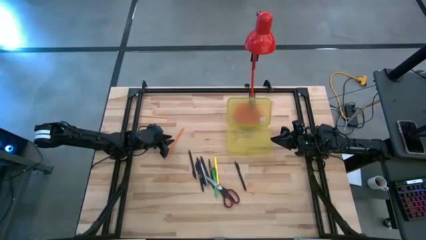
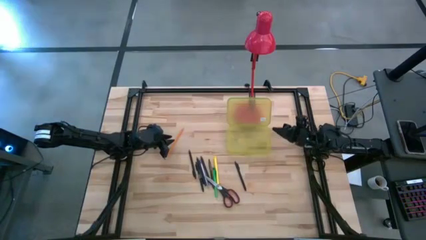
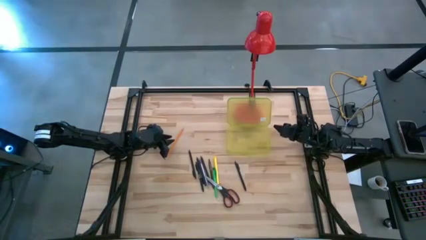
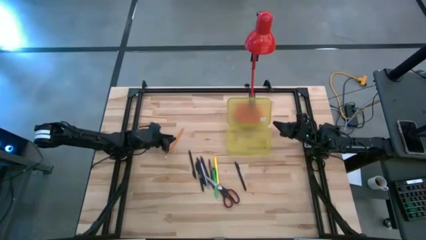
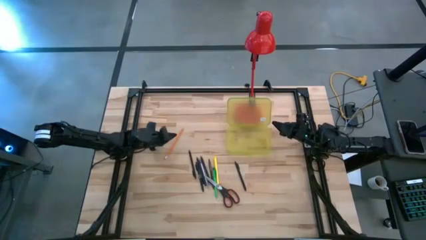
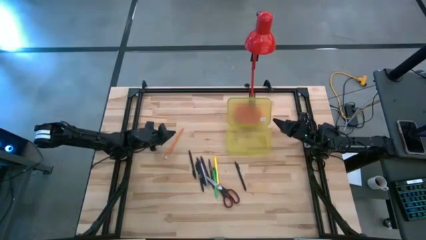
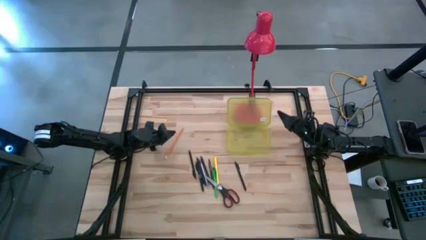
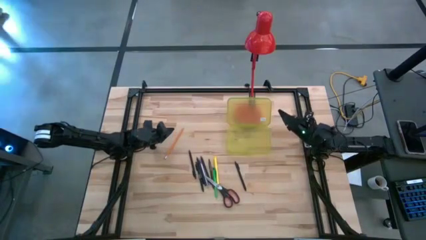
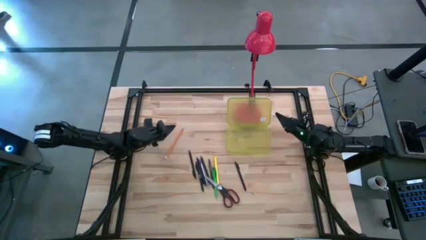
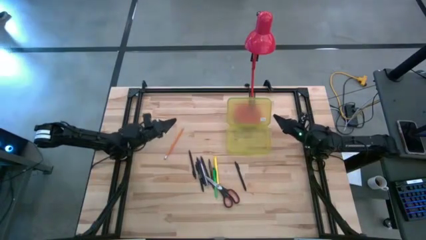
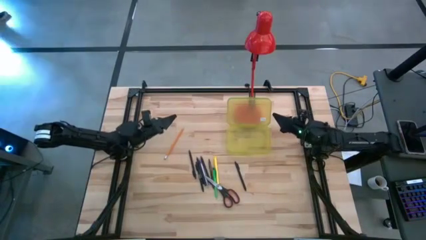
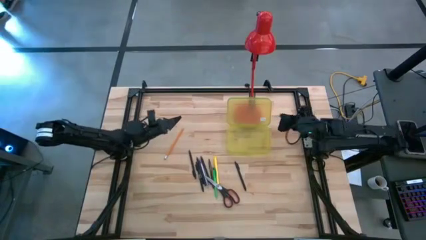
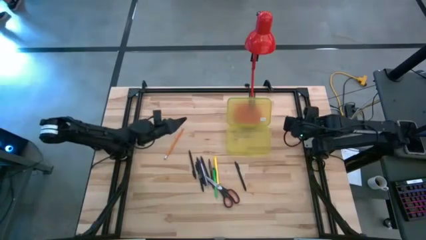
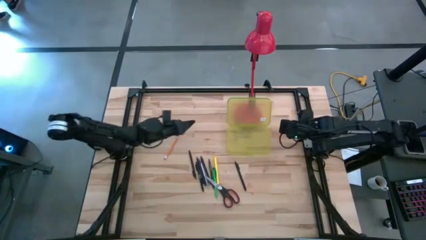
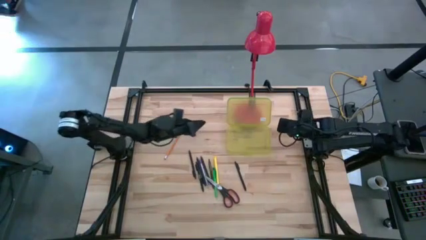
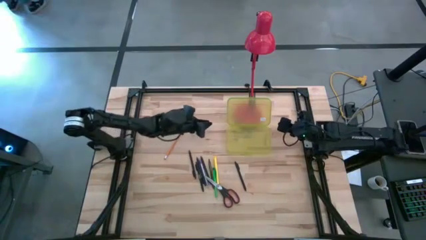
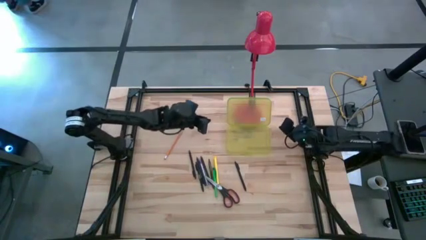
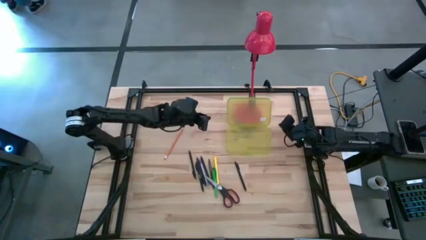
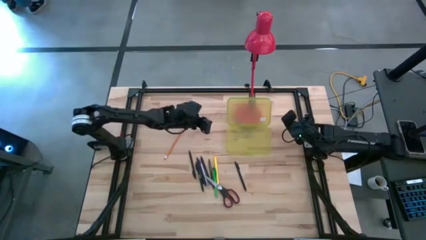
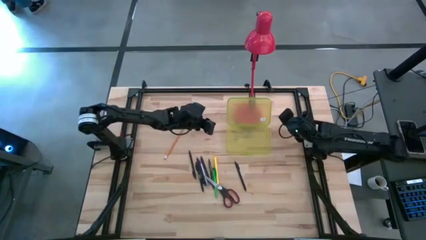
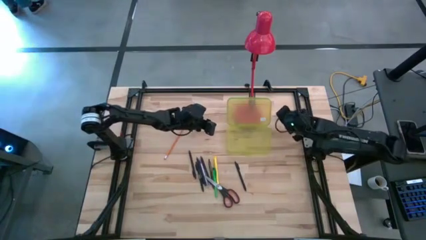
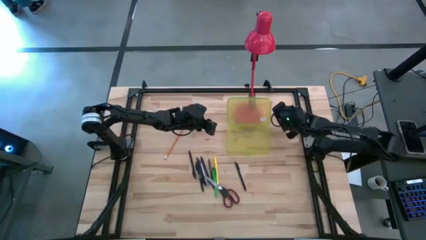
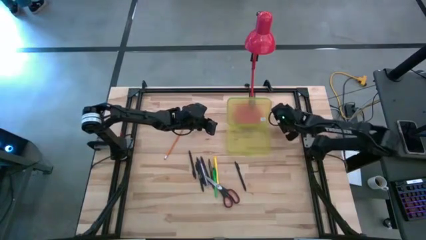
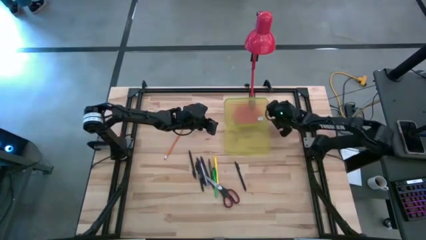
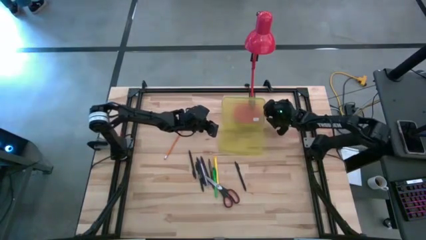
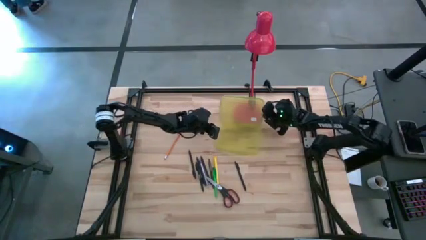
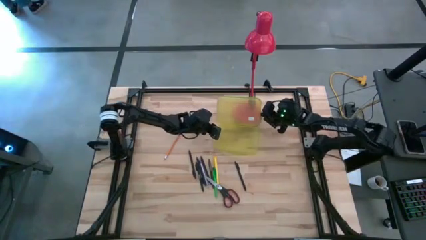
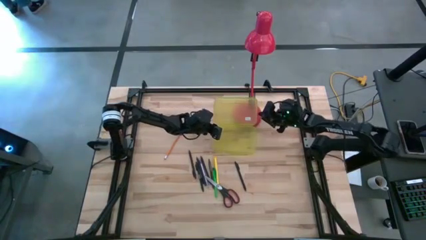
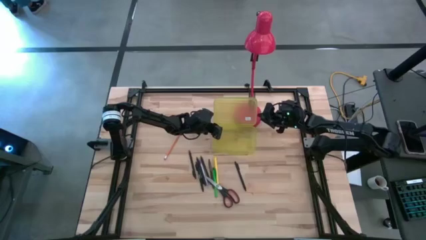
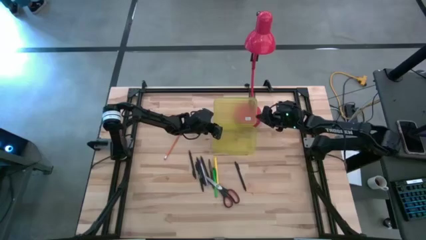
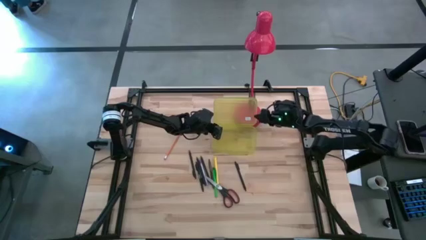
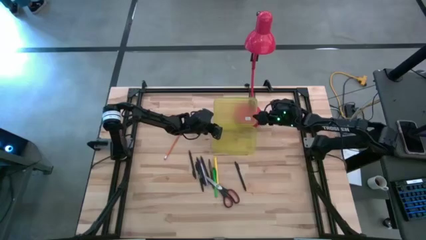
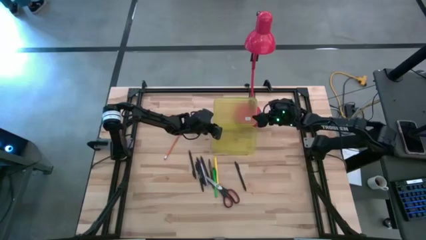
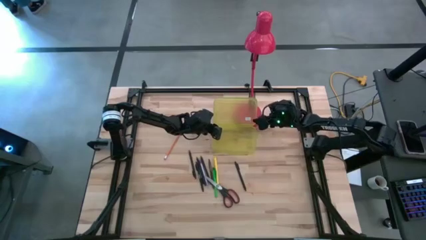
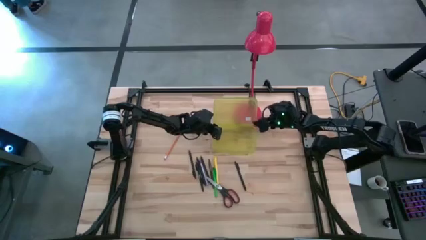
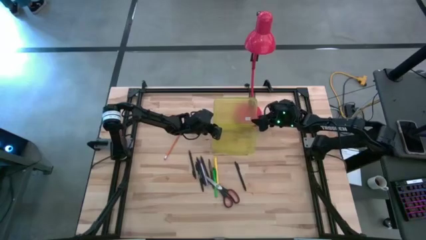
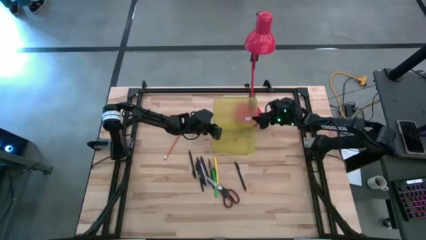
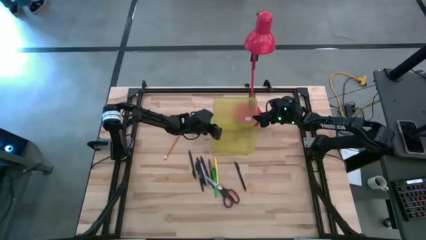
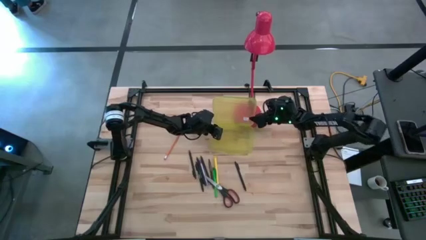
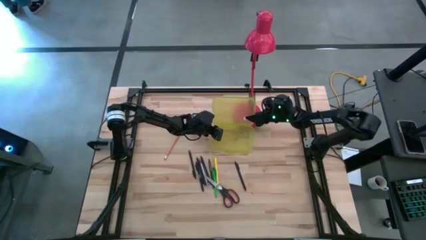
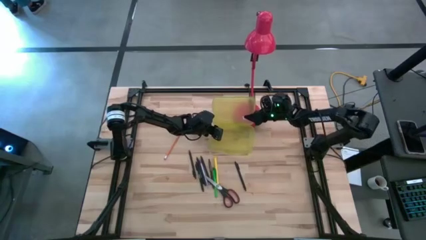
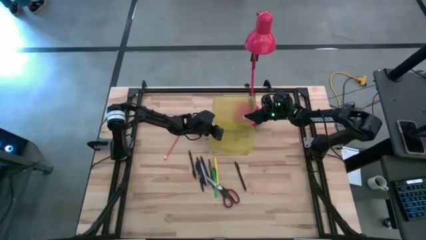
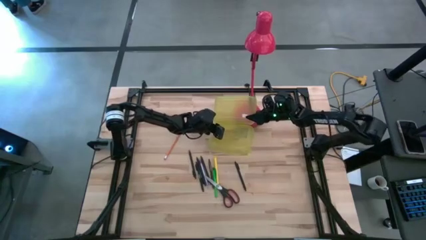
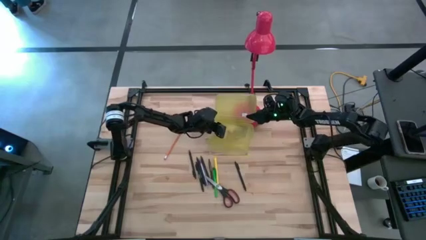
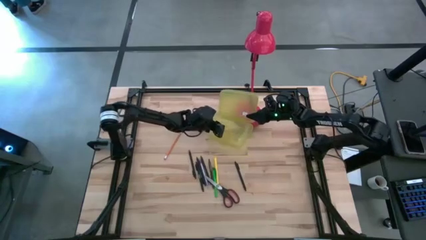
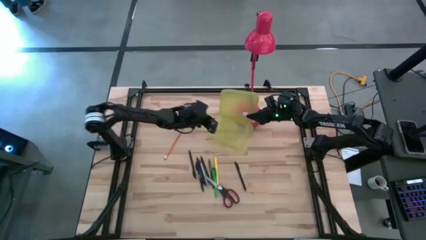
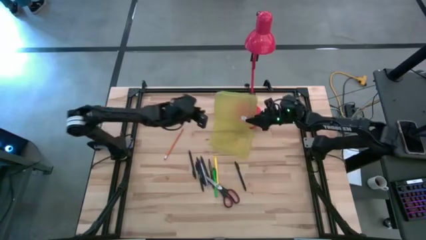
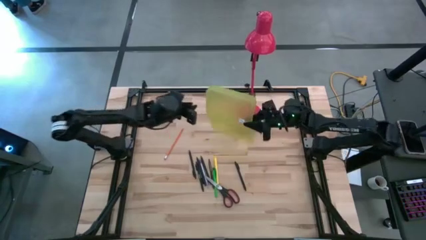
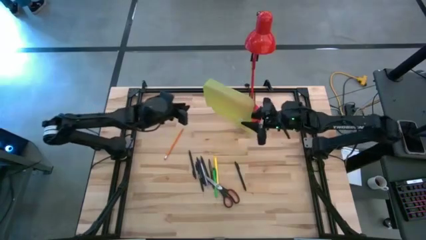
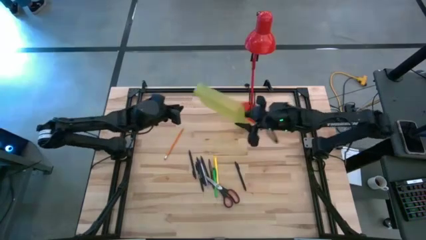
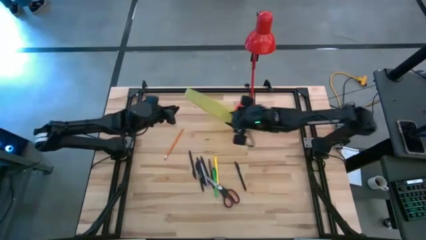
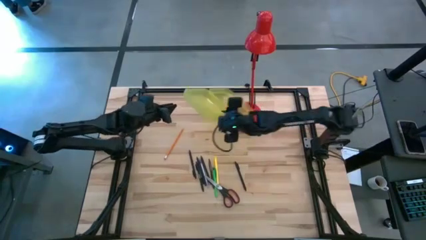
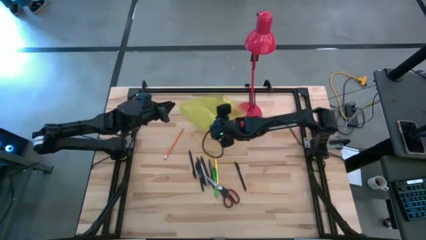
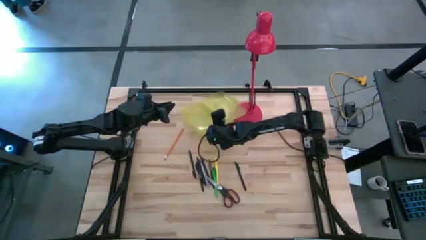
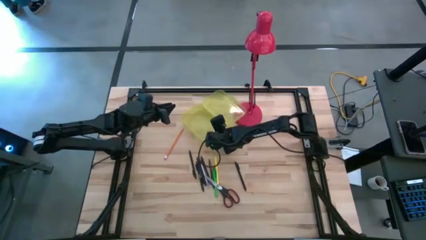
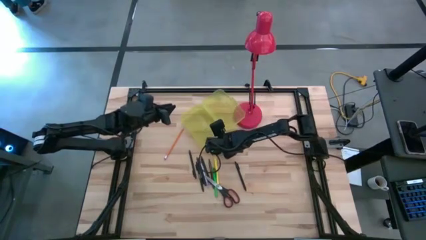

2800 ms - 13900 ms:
Task: Pick & place school supplies into a supply box
Adjust the yellow supply box

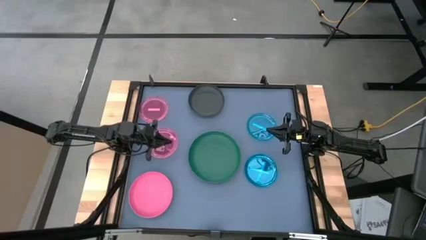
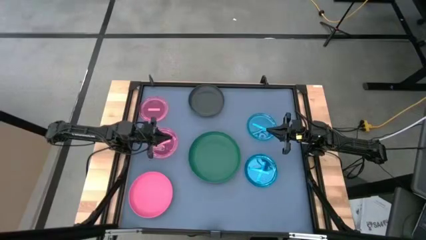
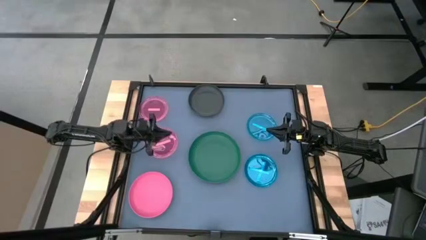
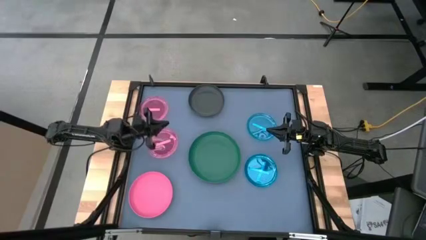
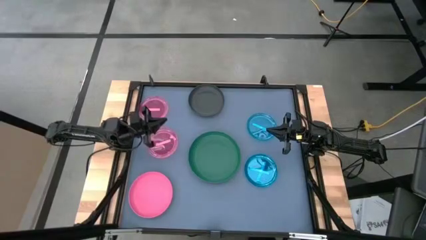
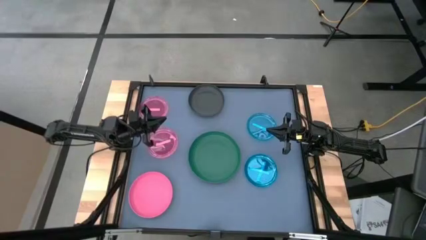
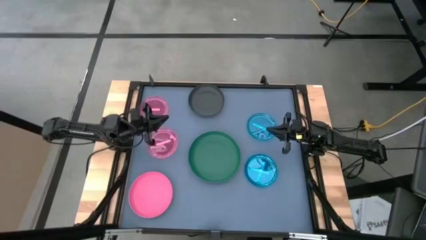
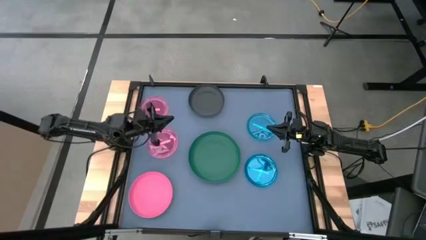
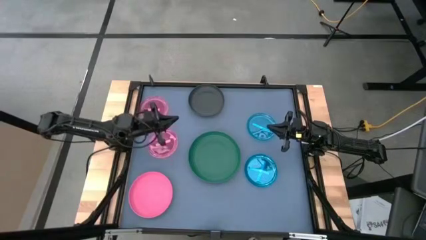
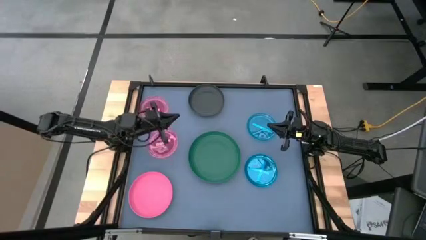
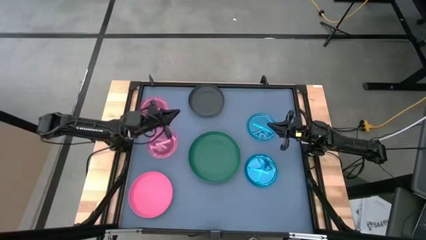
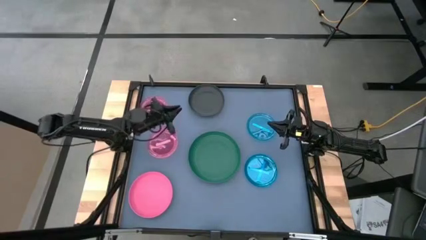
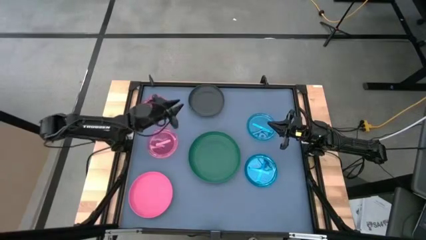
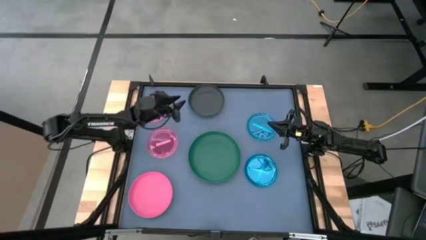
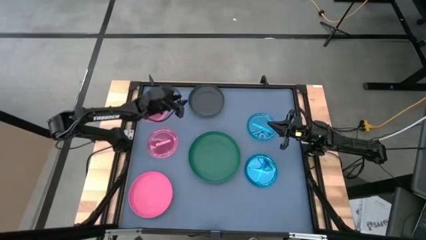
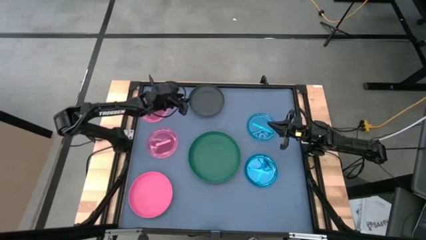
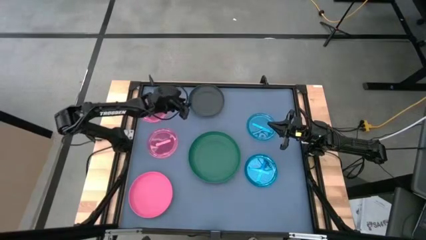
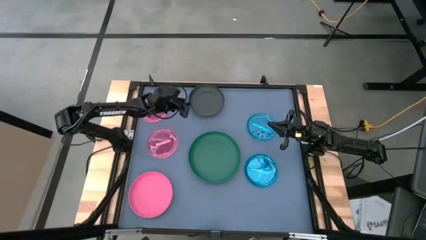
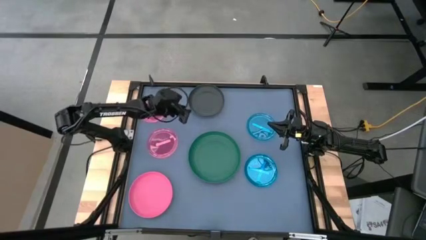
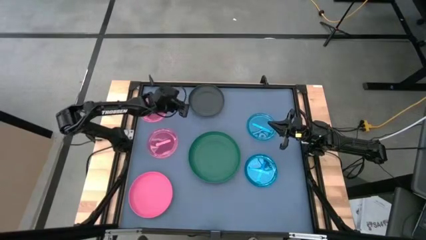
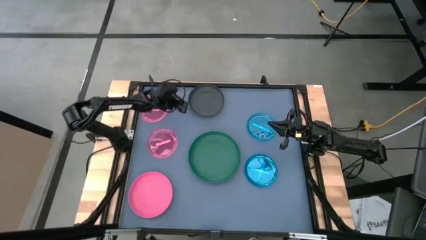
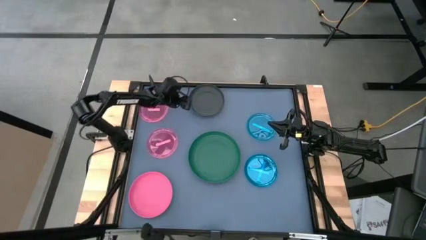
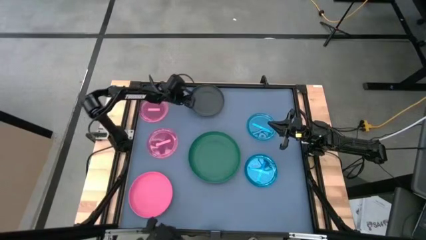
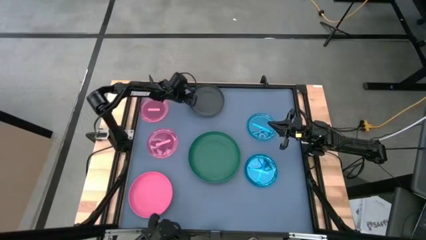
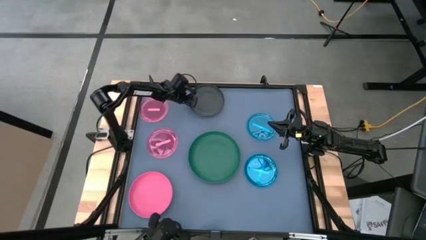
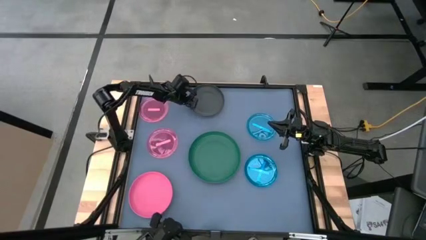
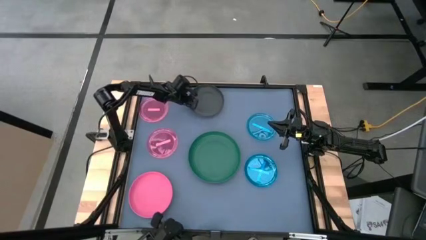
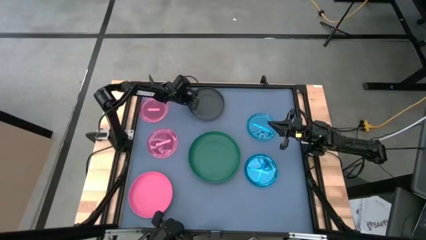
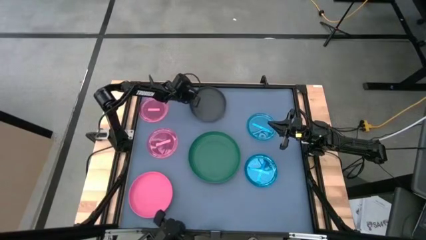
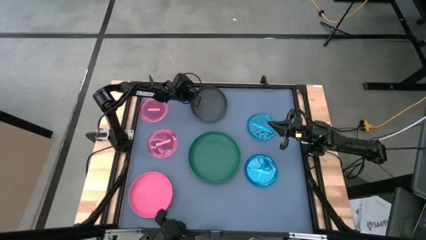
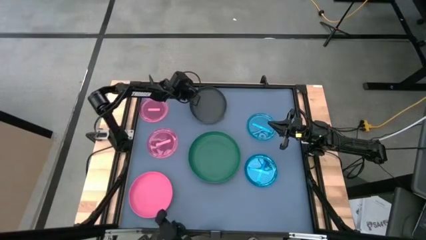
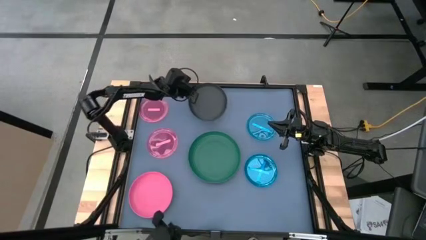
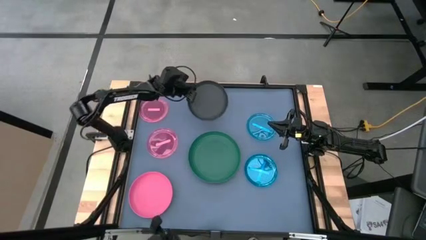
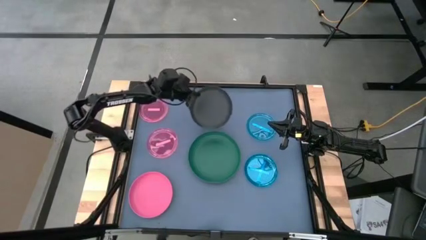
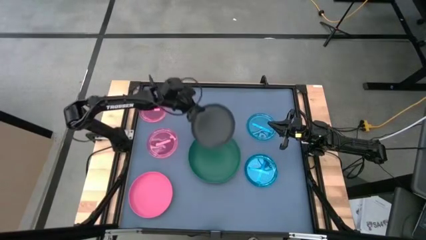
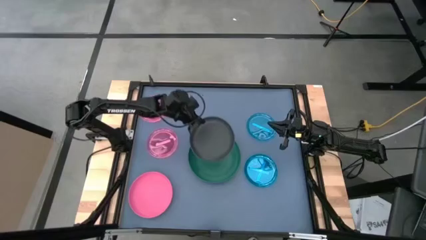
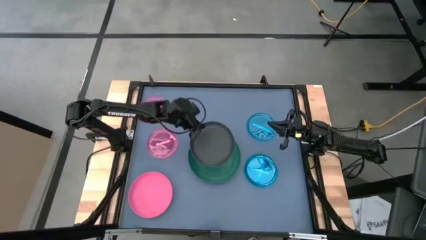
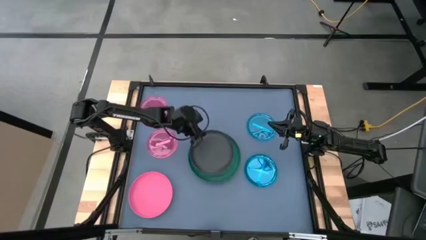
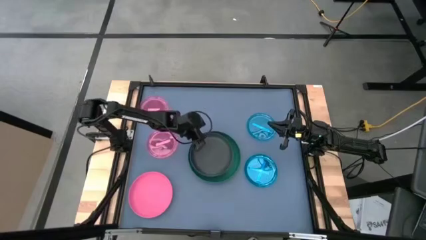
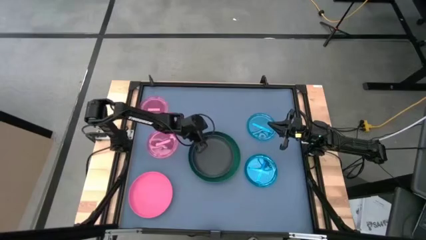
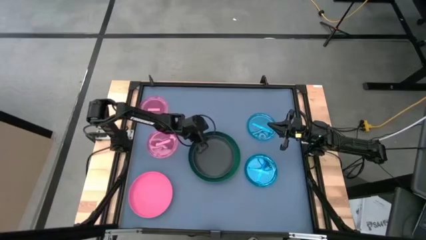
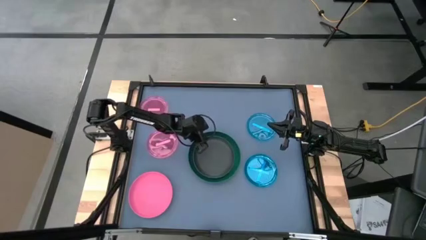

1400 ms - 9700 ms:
Task: Stack plastic plates
Stack the black plate on top of the green plate
